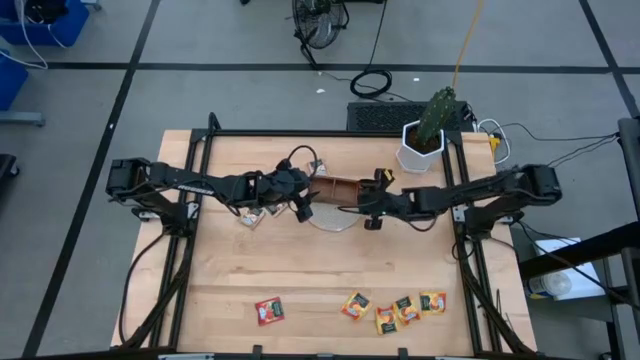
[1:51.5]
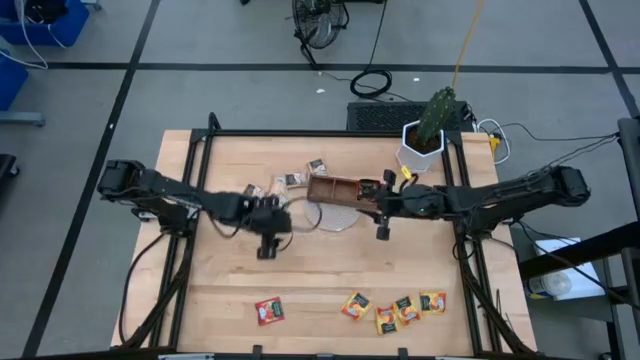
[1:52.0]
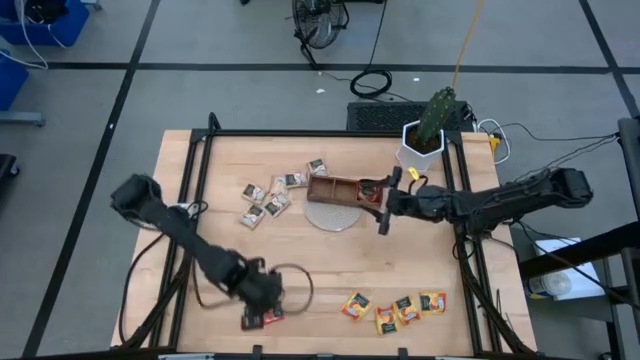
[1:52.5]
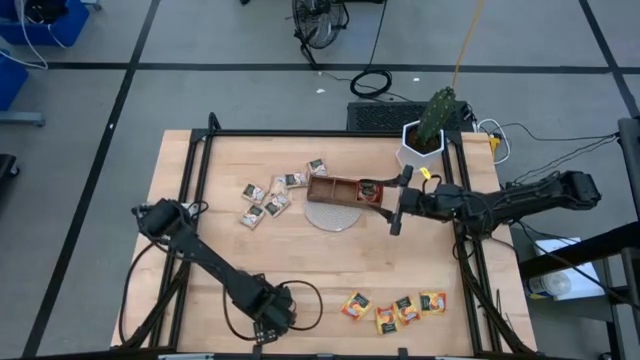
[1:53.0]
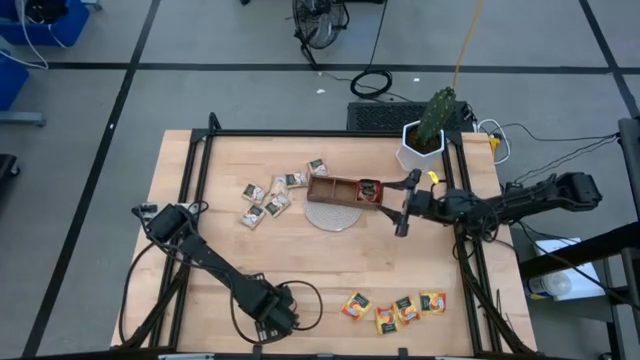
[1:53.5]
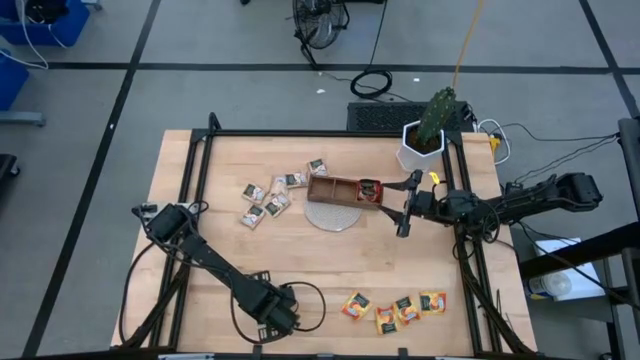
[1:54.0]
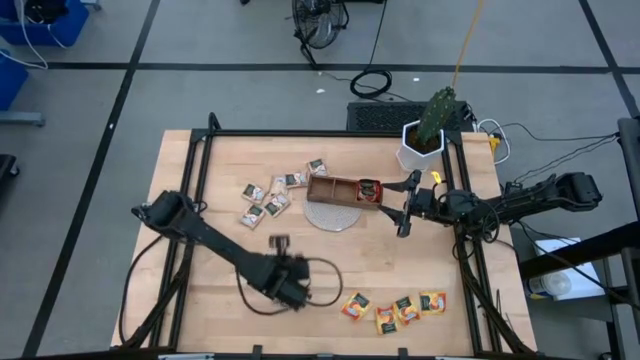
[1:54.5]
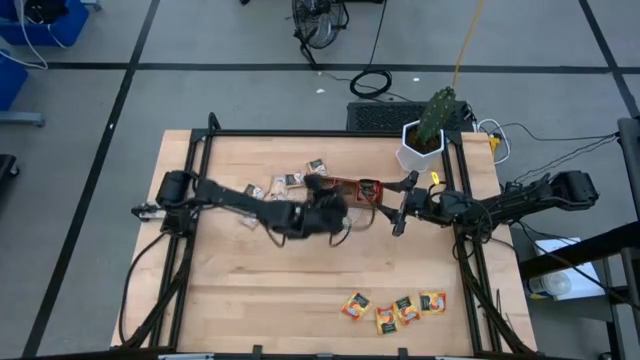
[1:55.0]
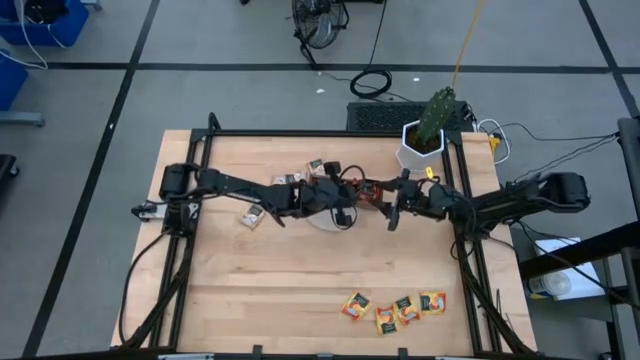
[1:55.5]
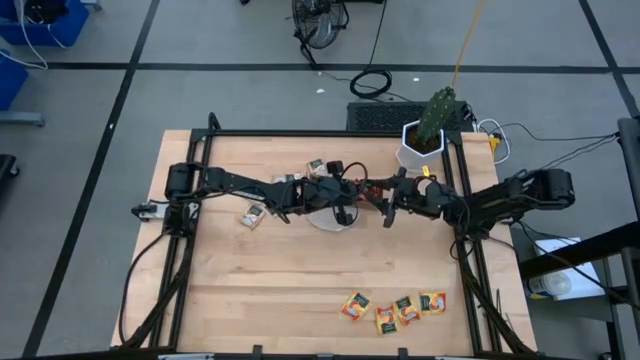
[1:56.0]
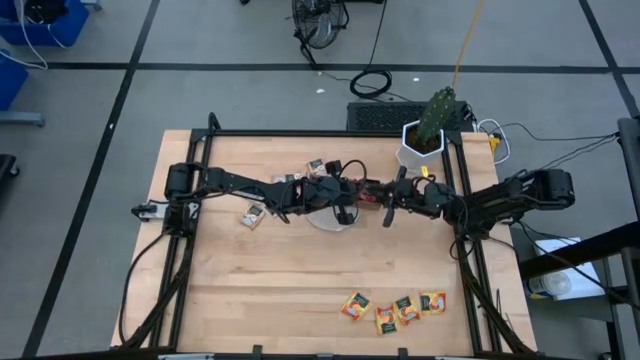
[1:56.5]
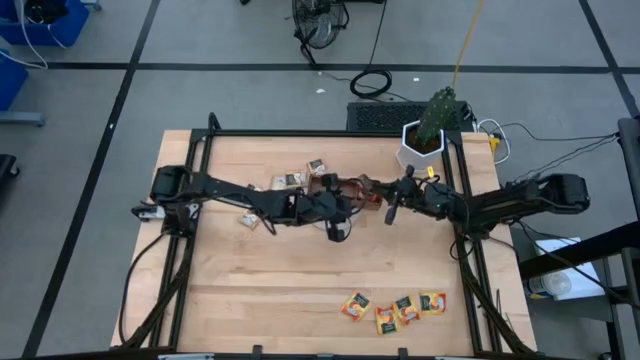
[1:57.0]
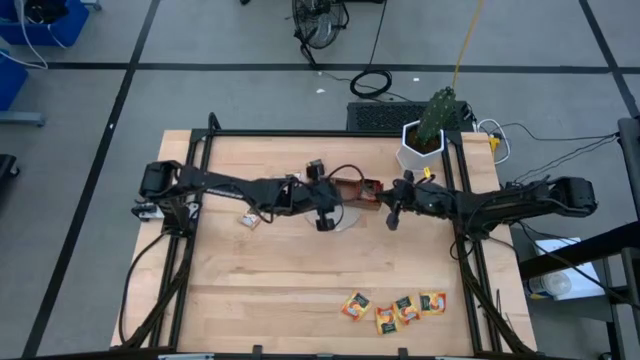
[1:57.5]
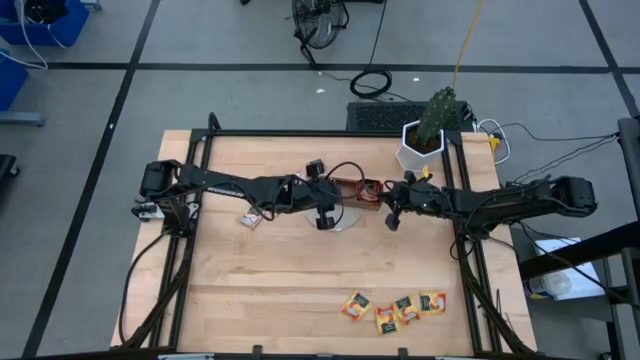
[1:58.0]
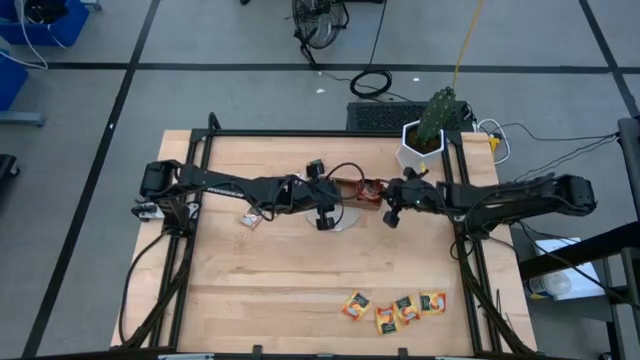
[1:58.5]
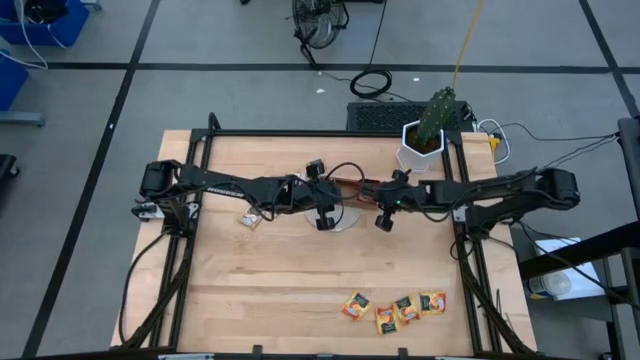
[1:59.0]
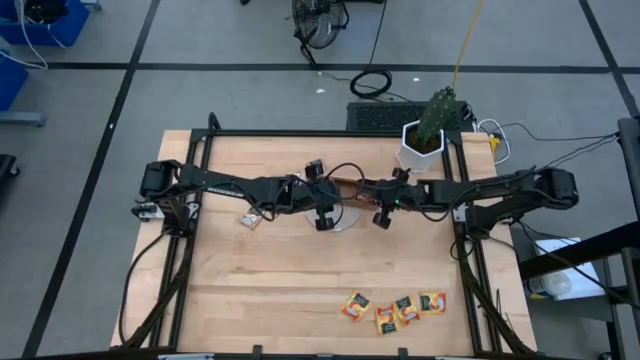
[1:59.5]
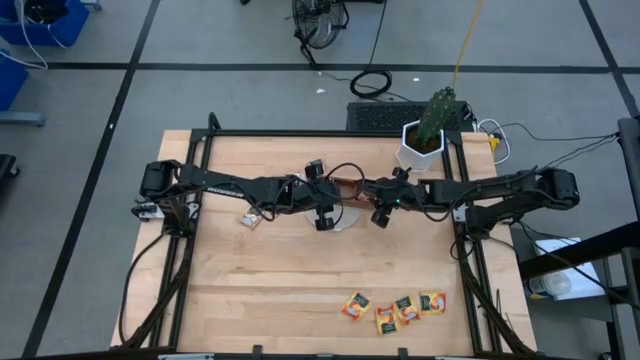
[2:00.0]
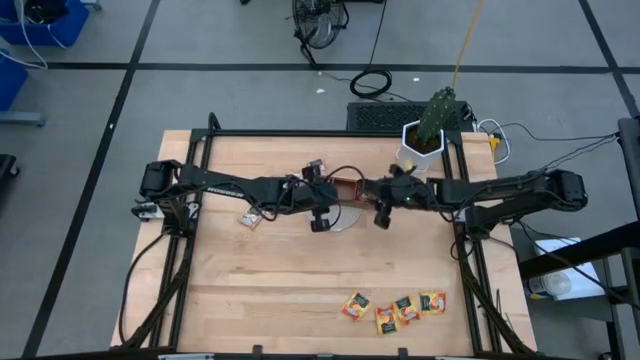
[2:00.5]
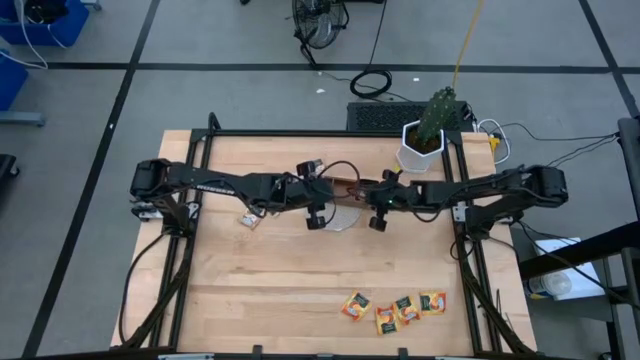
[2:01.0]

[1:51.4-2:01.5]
Task: Pick & Place Tea
Put the red tea bag into the right section of the wood organizer

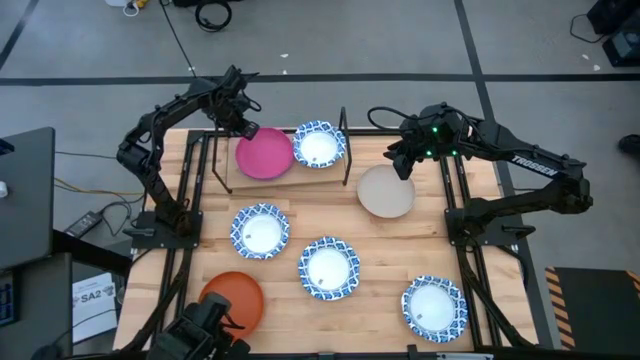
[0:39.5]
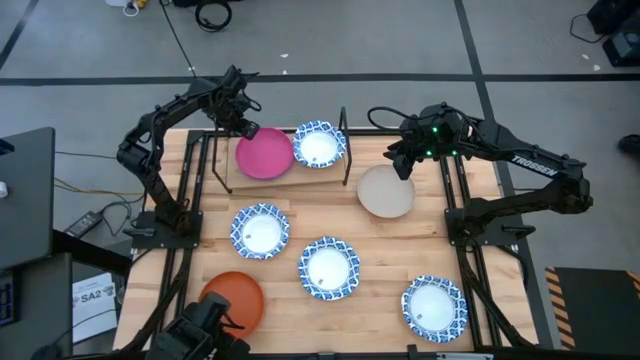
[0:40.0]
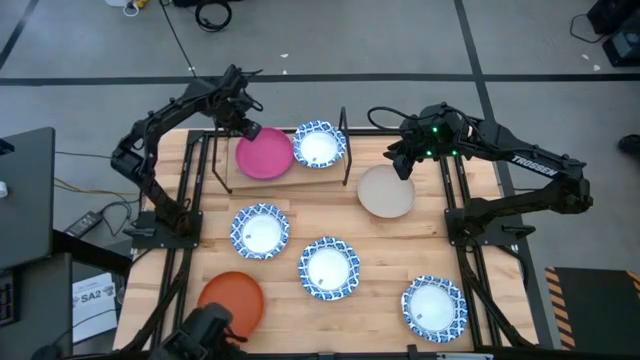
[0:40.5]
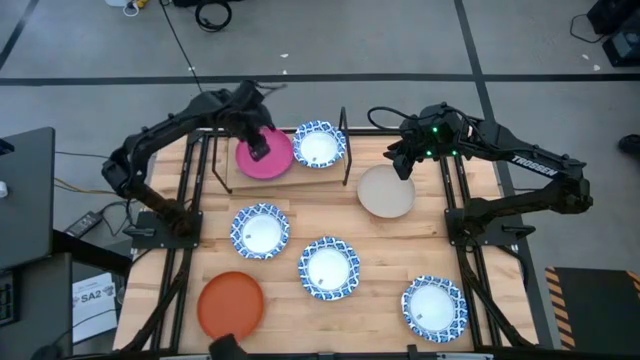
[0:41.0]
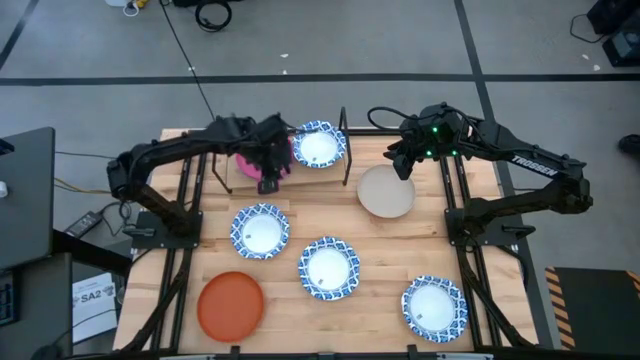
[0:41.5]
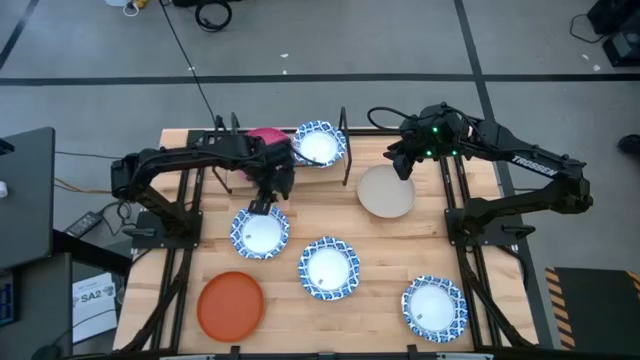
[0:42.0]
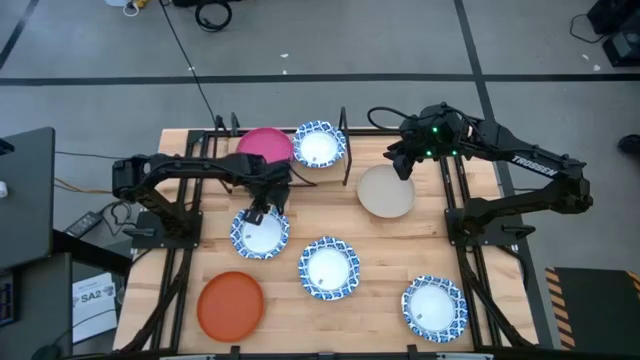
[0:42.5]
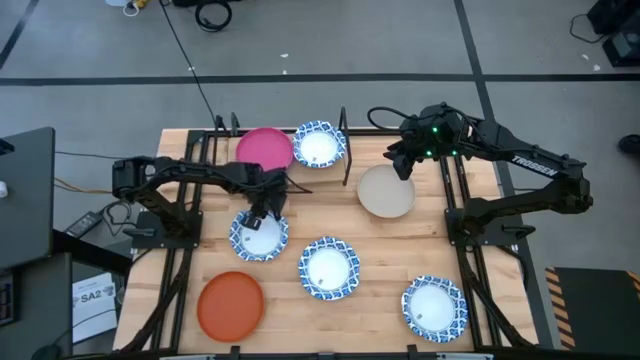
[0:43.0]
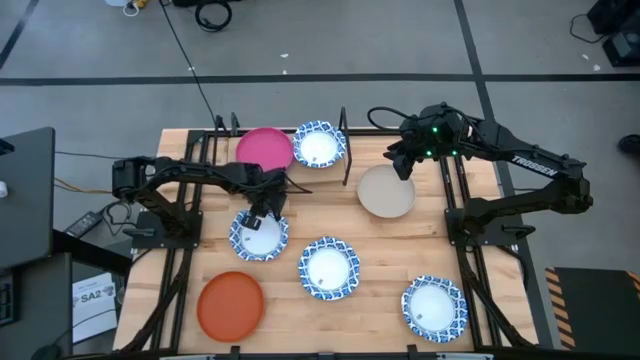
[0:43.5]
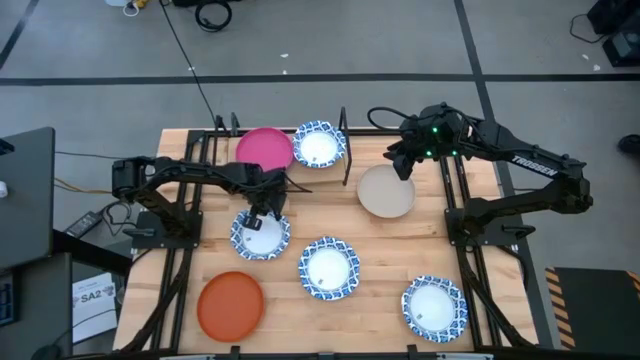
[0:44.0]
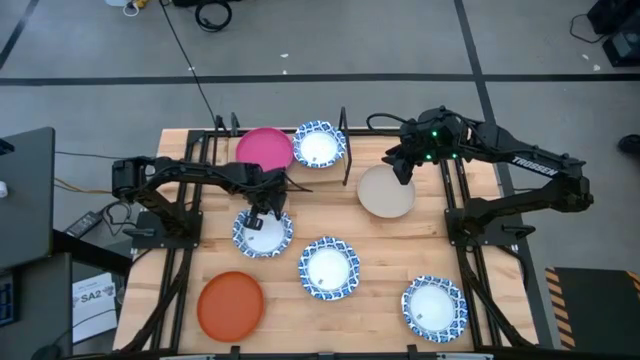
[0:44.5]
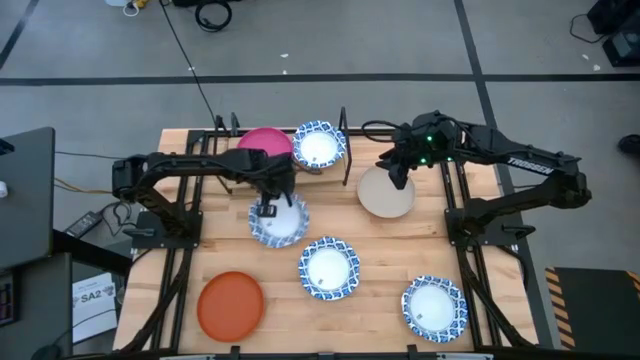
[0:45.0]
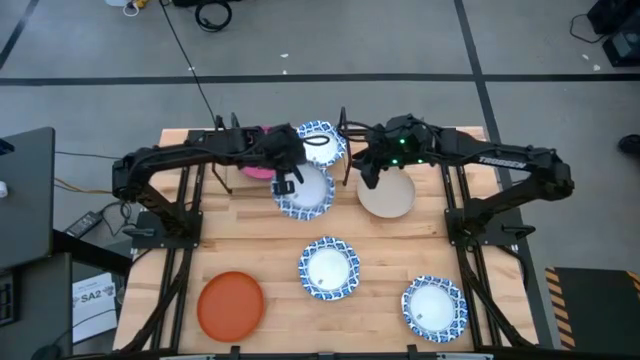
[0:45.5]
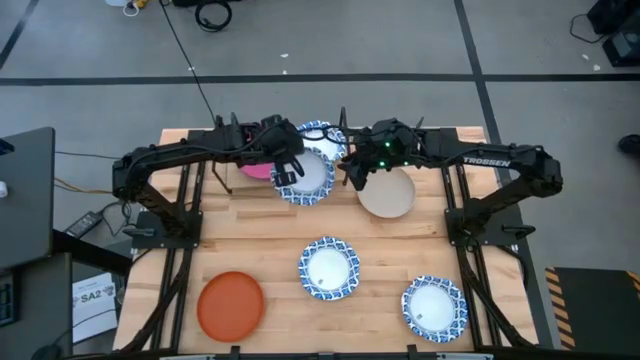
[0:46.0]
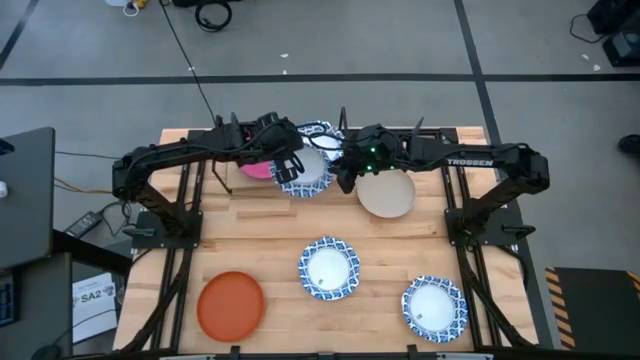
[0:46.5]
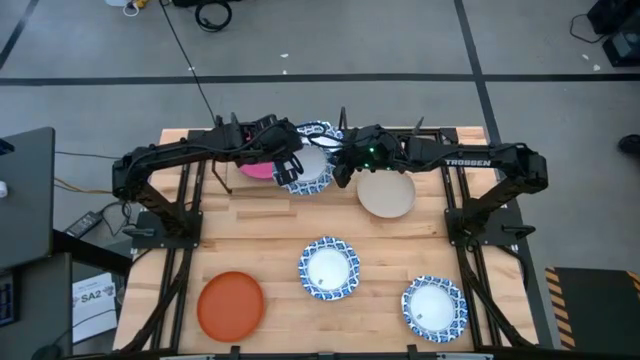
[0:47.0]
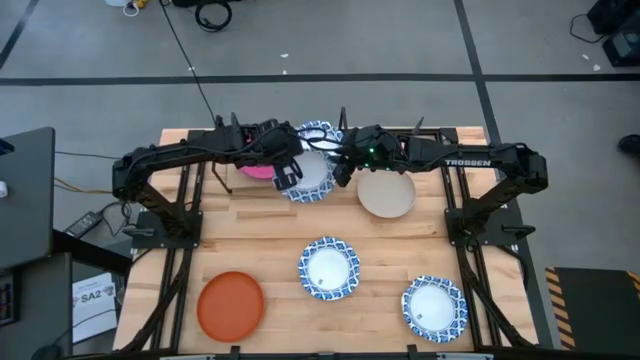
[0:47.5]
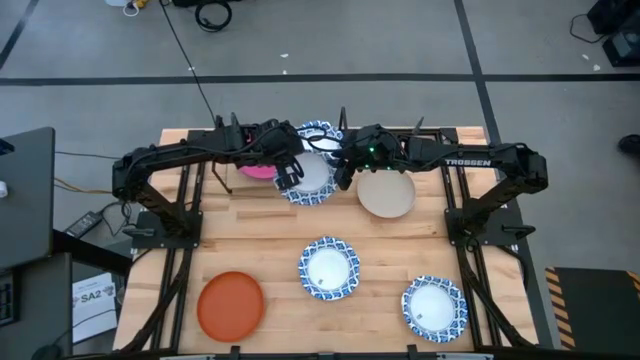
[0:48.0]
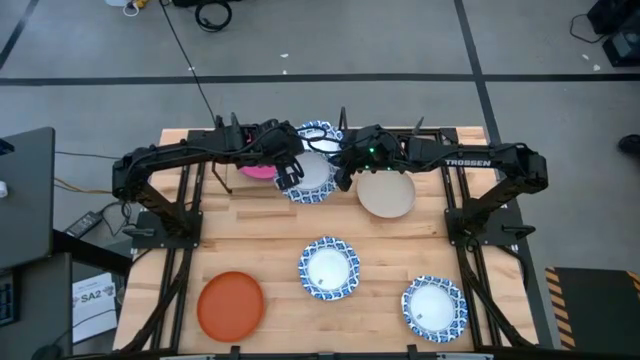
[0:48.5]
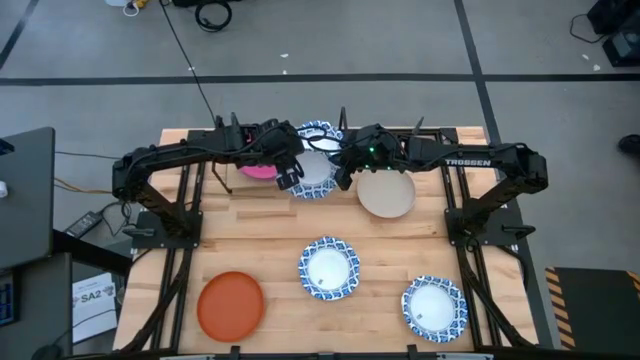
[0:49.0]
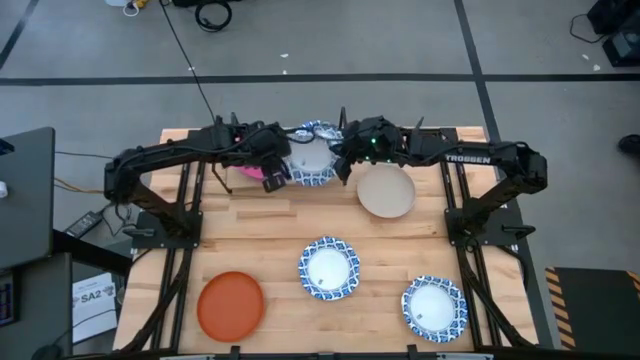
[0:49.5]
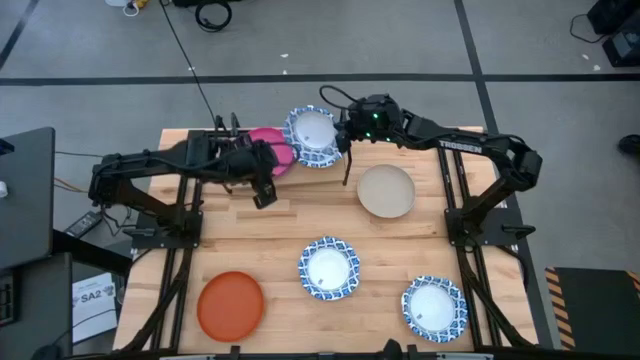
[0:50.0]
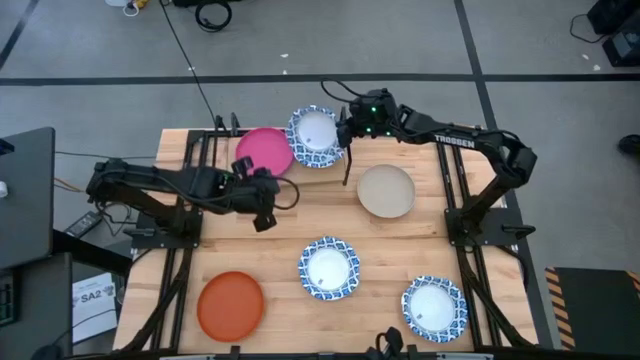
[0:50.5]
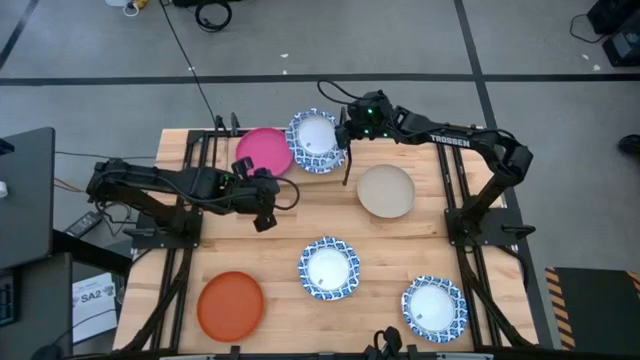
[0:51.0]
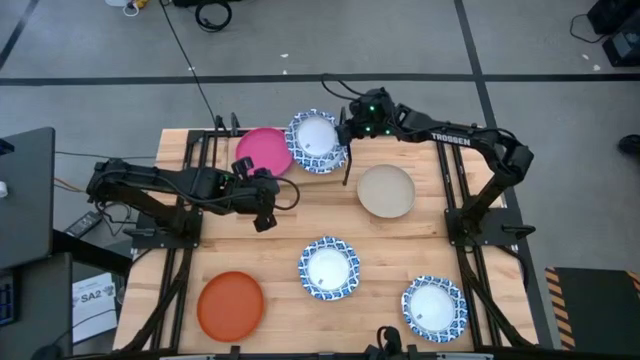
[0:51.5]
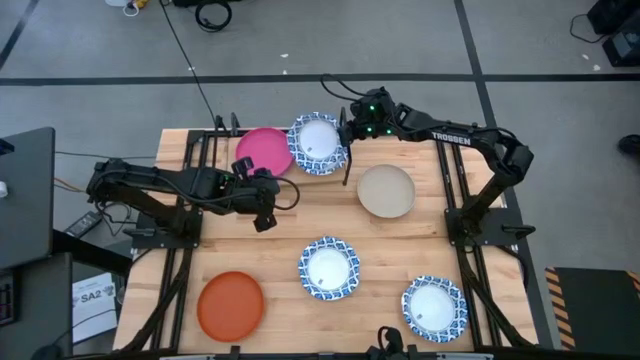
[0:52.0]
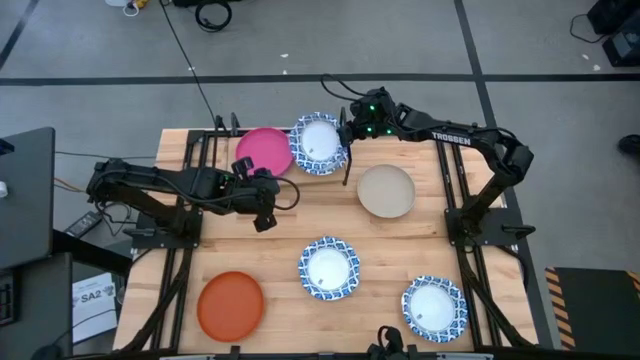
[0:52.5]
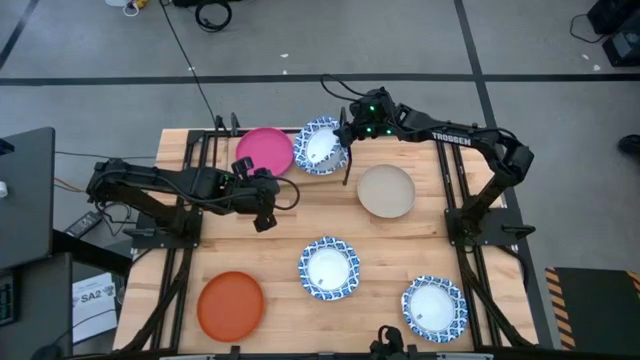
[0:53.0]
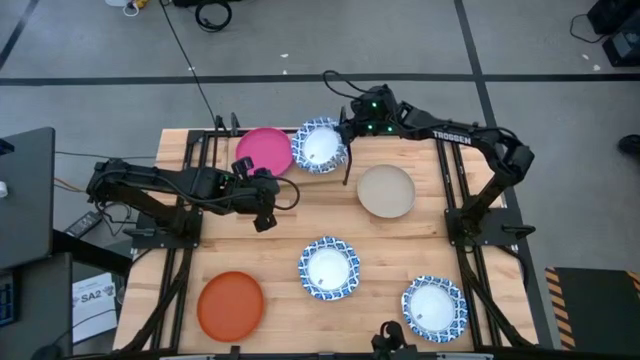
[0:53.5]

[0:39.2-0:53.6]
Task: Place and stack plates onto a shelf
Stack the blue patterned bowl on top of the blue patterned bowl on the shelf
